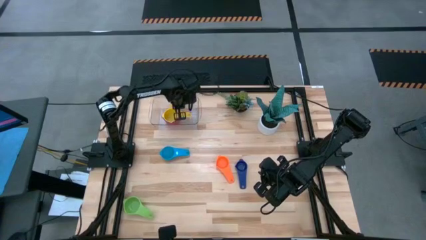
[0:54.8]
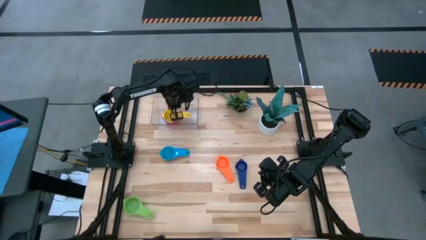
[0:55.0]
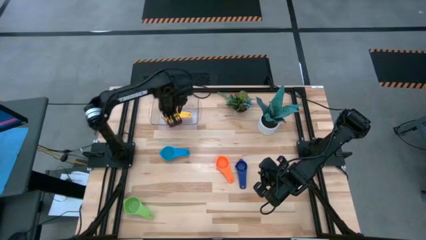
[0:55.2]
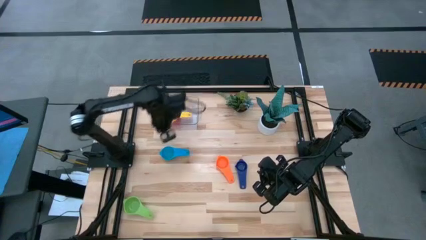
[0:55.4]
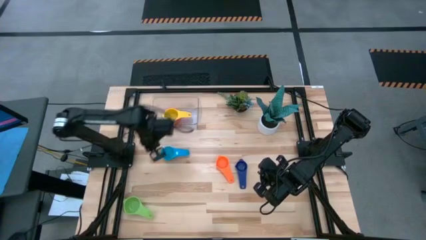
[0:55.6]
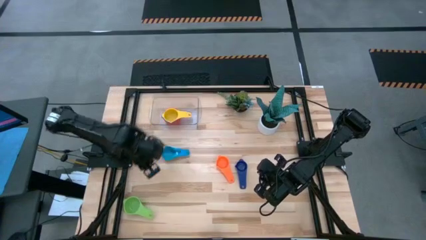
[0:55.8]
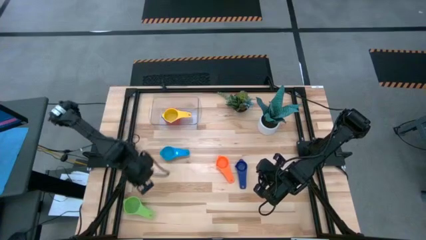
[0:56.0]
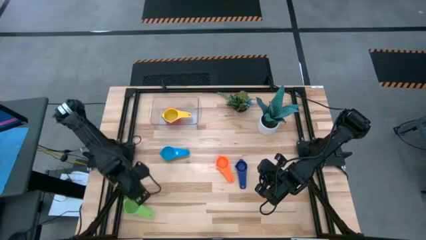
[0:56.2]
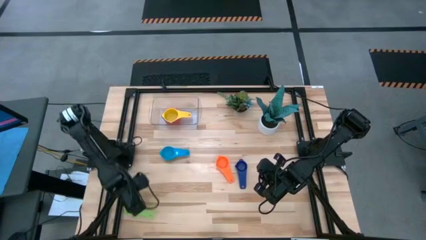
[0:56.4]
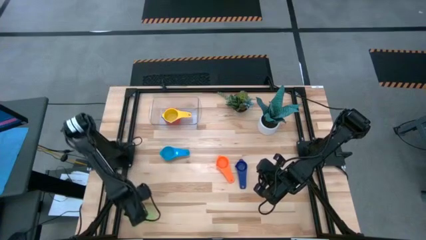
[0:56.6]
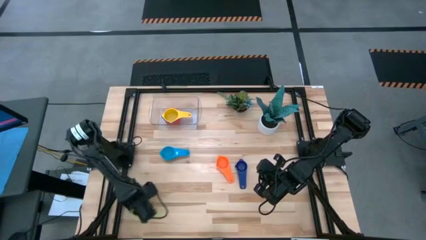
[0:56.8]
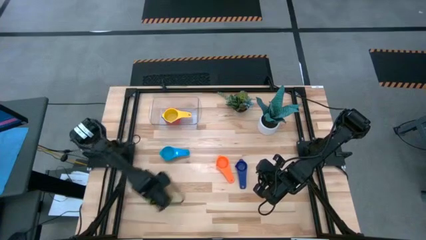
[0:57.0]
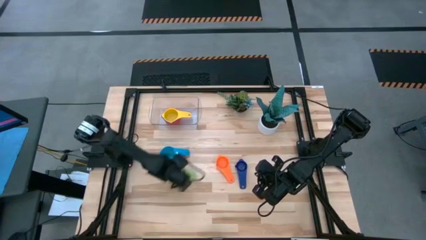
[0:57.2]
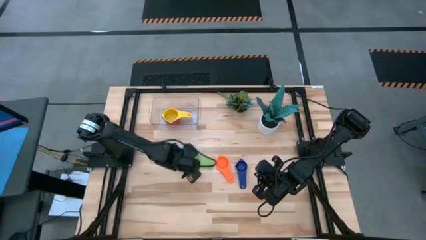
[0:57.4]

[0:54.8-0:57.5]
Task: Nest measuring cups in basket
Move the green measuring cup to the center of the table

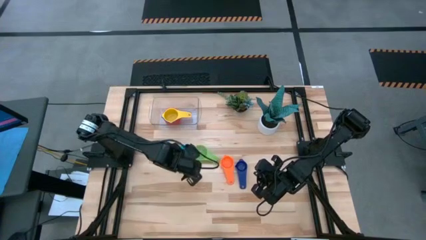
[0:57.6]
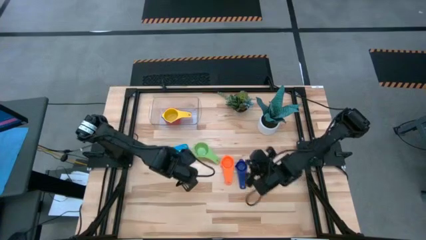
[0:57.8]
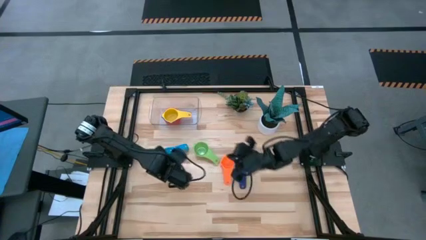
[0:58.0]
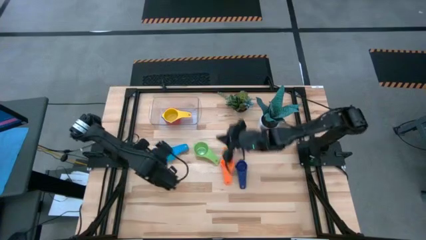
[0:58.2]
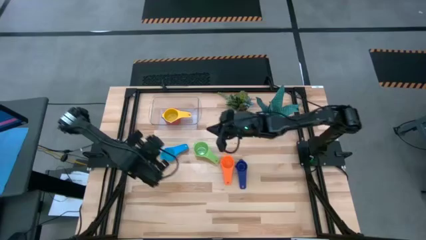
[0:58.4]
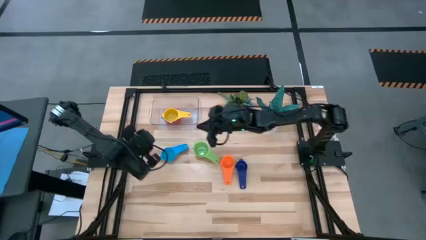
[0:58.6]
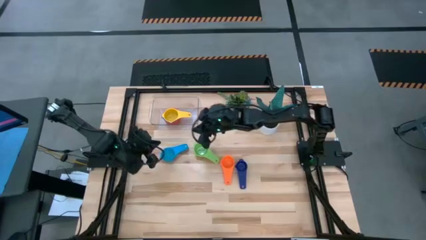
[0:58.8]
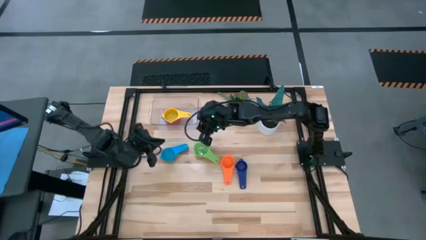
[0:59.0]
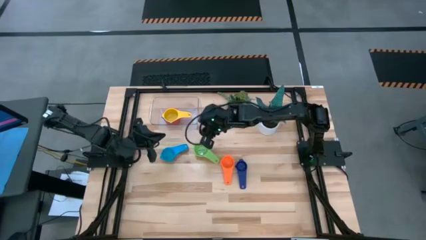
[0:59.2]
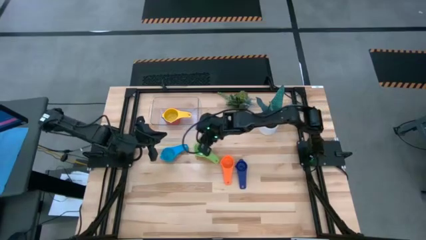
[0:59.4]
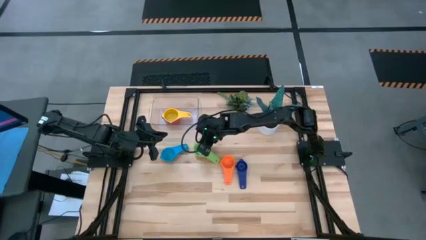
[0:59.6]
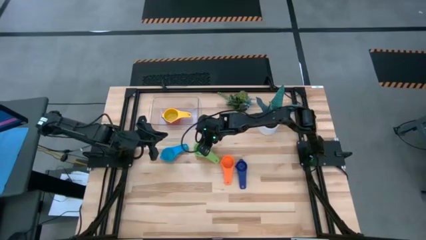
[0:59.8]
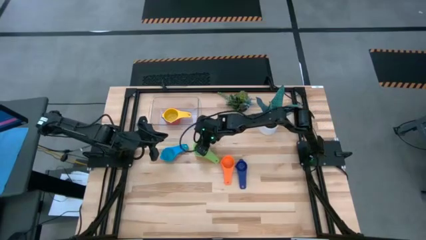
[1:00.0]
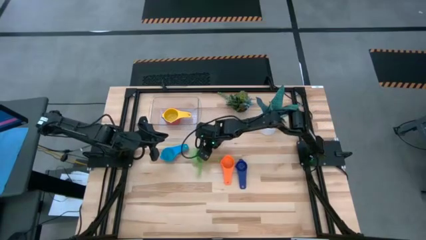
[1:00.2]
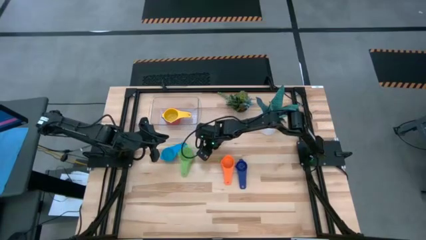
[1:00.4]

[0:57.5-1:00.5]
Stack the green measuring cup on top of the yellow measuring cup in the transparent bin

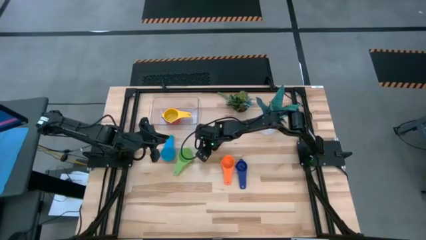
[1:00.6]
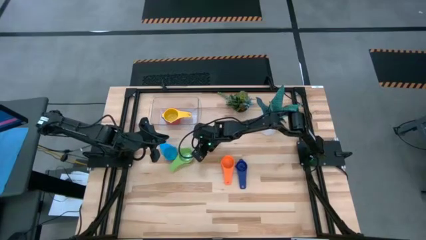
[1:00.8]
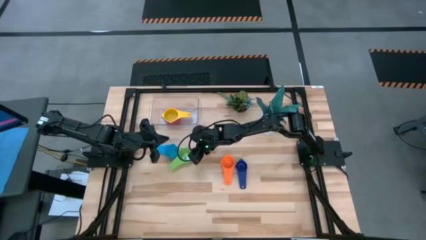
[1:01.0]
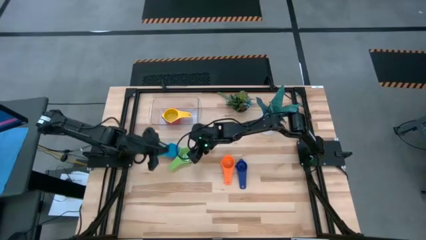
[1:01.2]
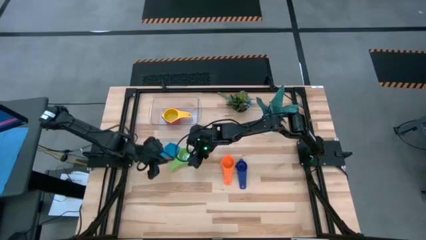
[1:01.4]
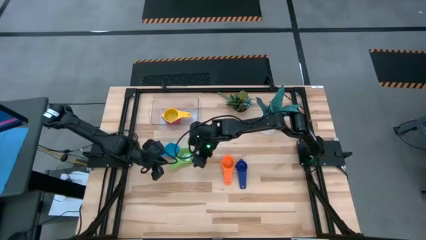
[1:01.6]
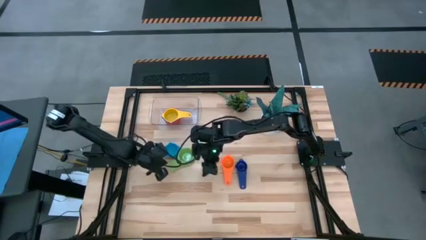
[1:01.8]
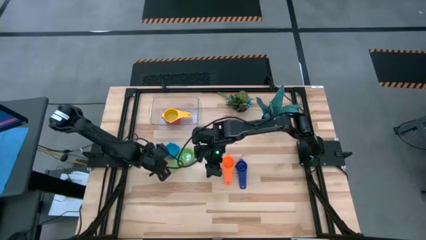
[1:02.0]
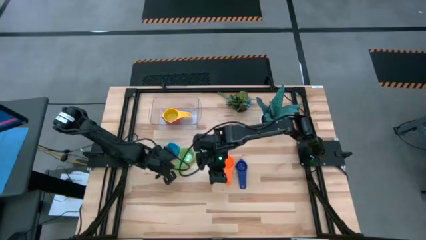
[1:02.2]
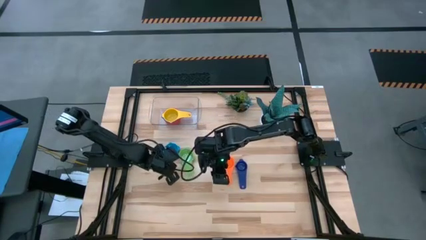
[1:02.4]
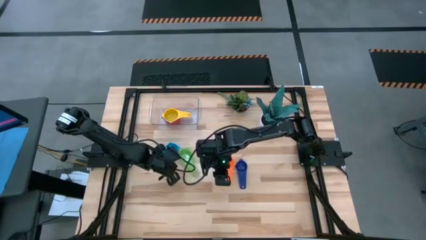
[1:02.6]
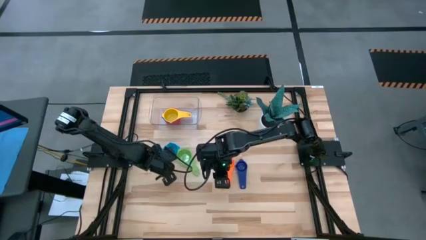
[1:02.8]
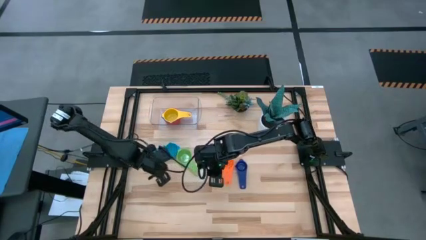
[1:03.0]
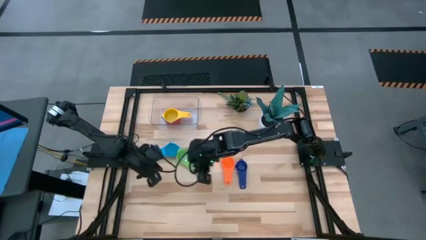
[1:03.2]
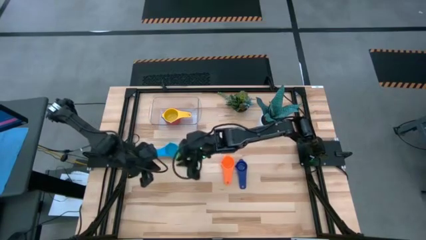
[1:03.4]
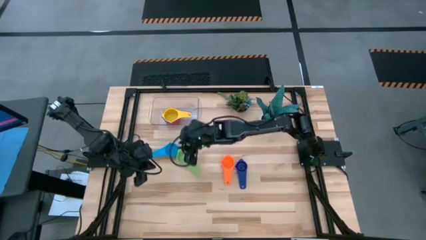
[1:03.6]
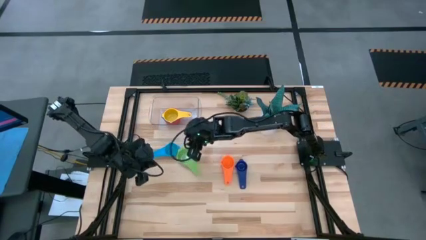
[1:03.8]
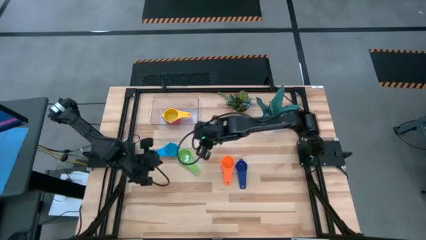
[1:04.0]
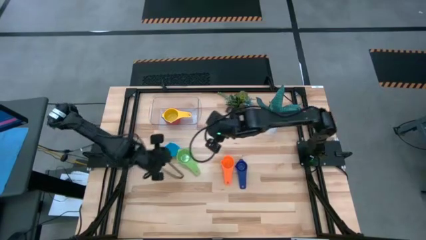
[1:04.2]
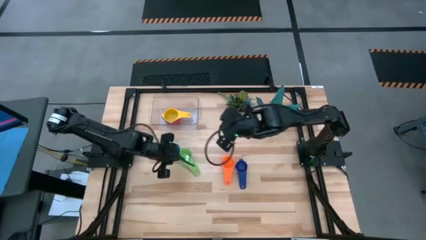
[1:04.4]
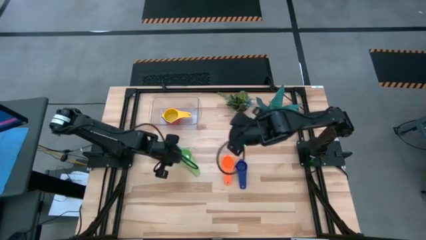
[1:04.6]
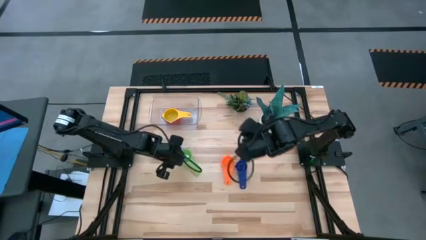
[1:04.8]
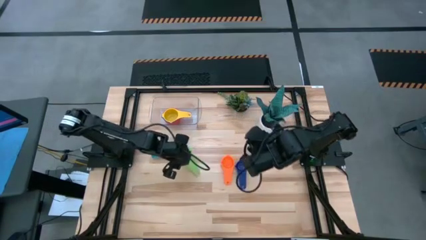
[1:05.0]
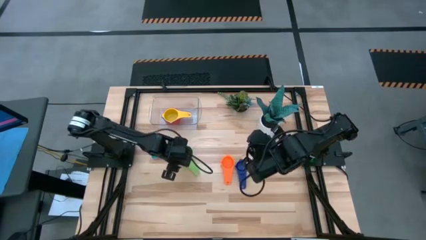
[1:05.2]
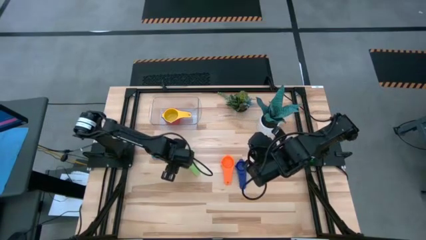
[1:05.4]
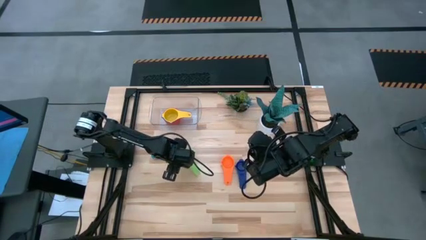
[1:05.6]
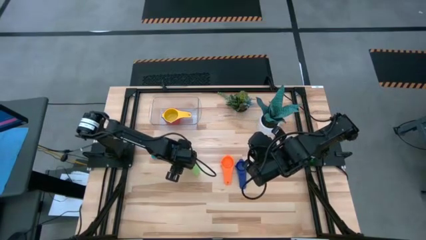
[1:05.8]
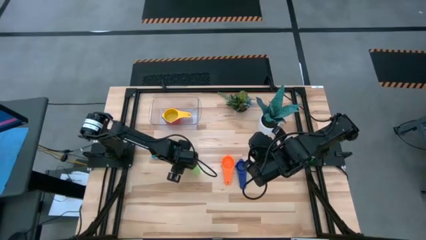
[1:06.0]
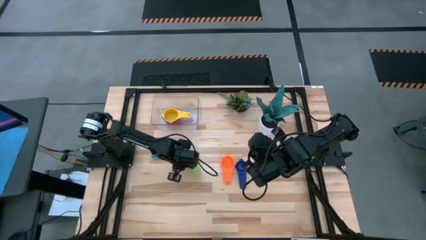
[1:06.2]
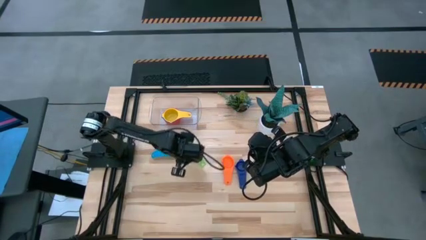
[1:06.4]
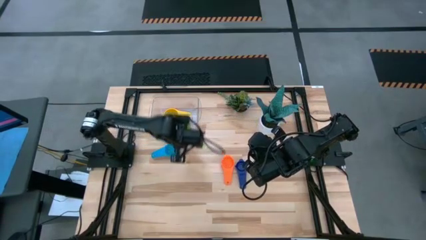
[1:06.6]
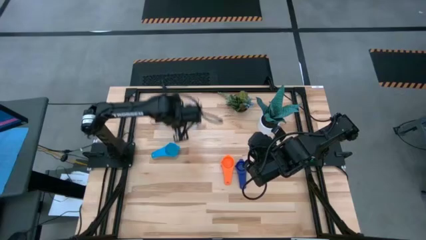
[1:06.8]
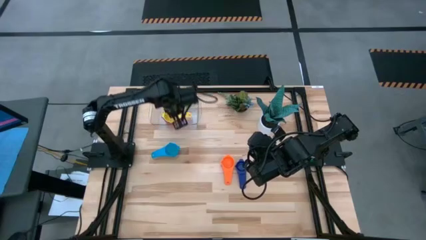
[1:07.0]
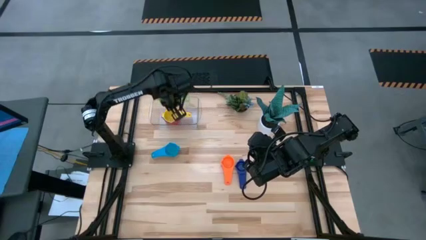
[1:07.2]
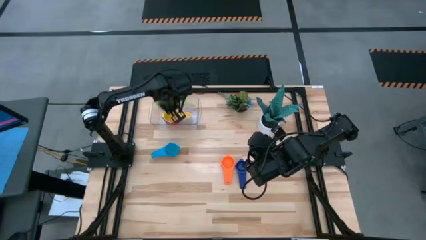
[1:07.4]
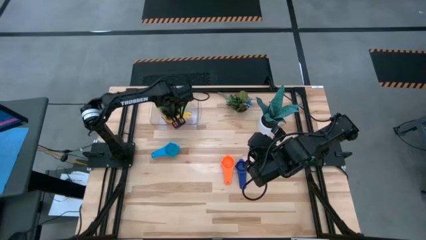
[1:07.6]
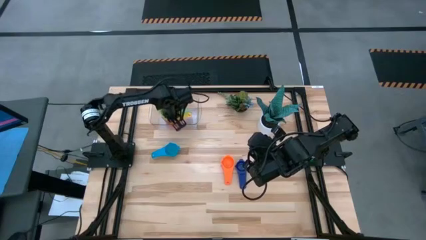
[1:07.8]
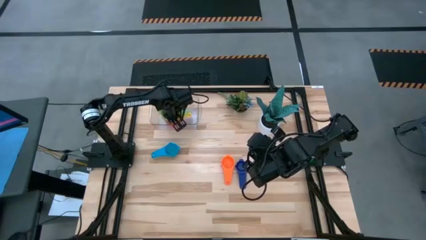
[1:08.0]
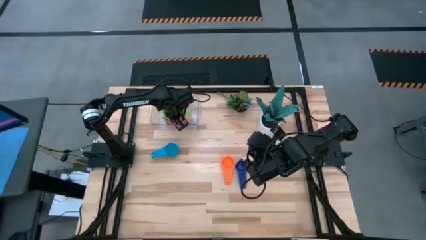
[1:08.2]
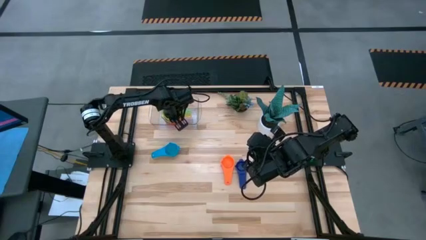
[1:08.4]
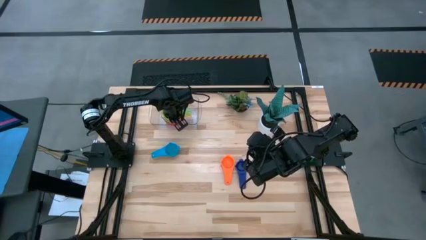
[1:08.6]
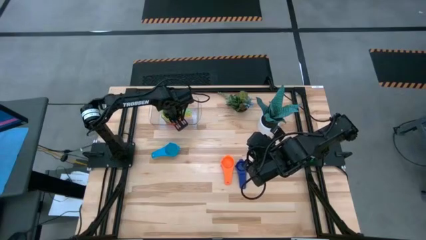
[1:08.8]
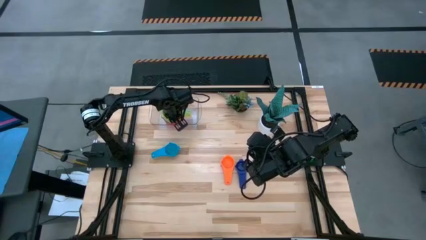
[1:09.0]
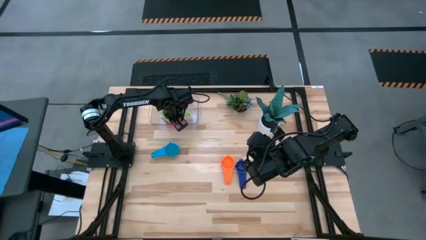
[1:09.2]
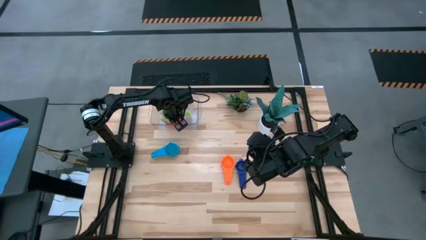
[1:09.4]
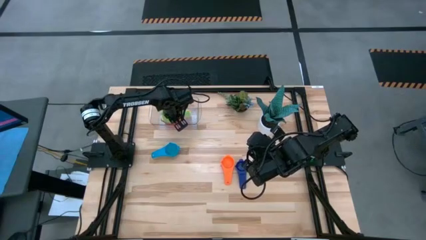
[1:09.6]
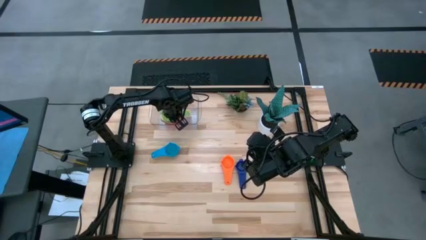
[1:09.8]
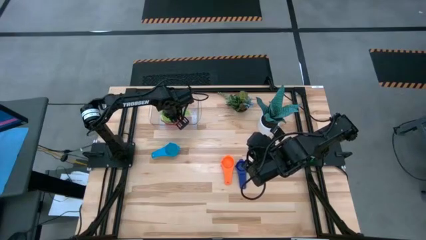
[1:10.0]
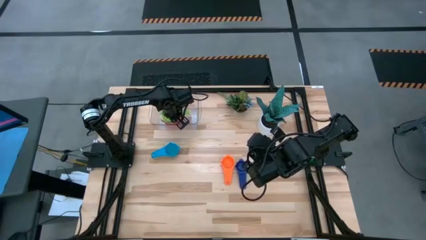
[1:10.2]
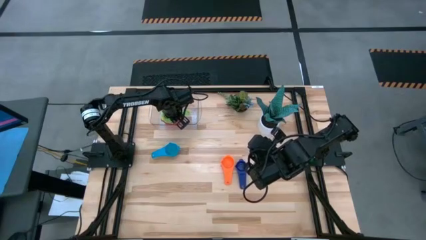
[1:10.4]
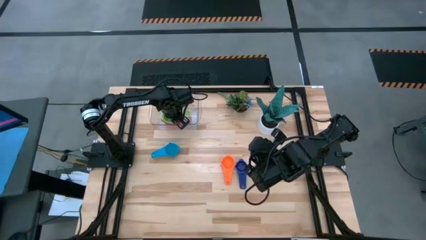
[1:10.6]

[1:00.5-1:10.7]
Stack the green measuring cup on top of the yellow measuring cup in the transparent bin

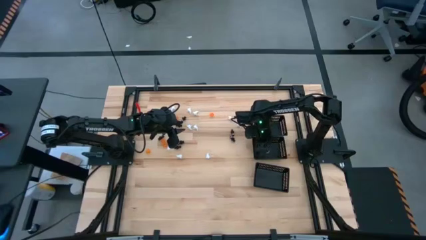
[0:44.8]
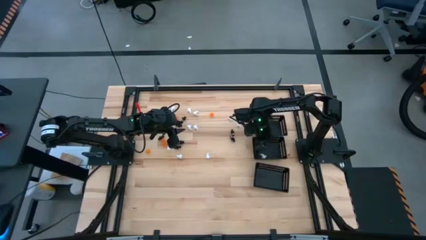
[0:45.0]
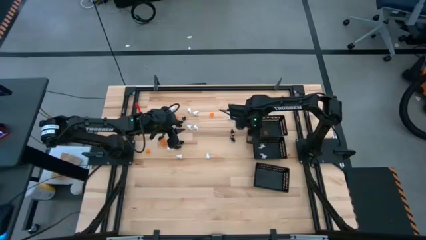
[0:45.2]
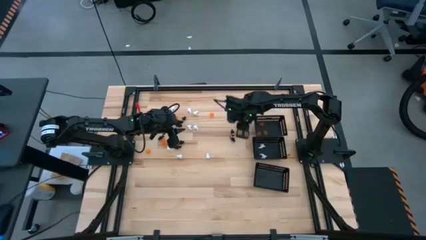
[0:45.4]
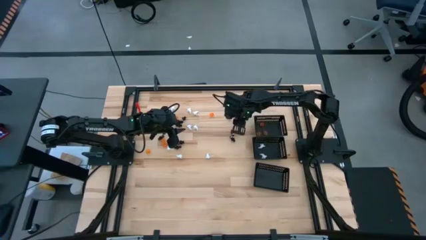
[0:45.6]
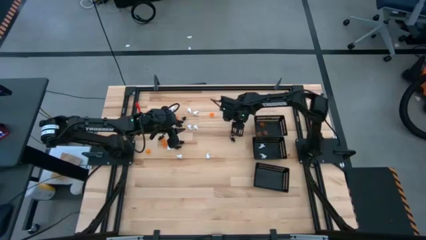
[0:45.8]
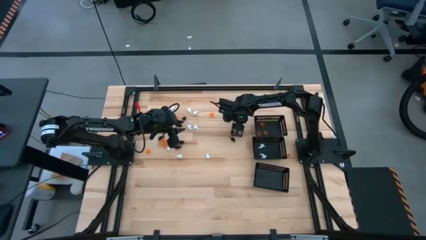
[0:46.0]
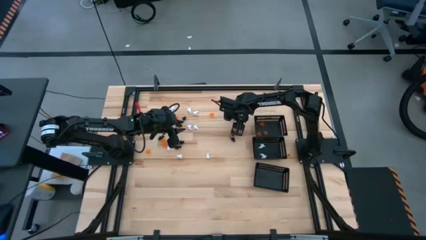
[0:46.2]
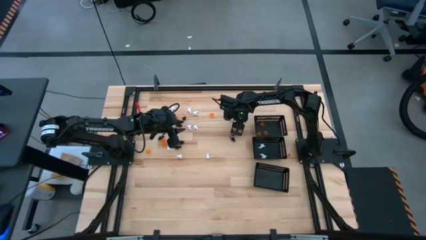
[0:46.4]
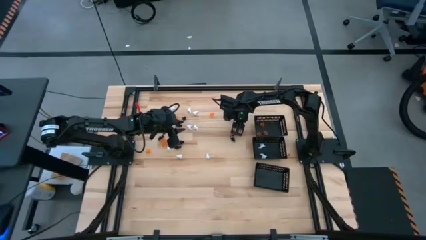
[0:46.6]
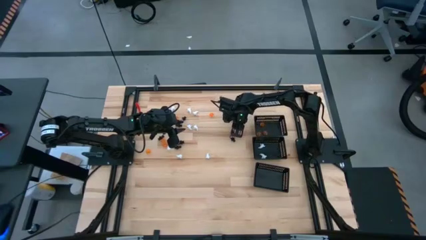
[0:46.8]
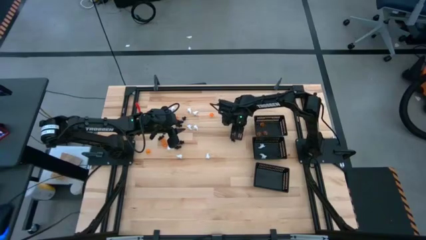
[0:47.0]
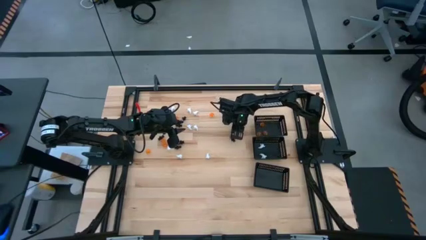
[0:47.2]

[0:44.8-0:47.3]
Task: Sort Halloween decoration
Put the white ghost toy into the center right black bin
